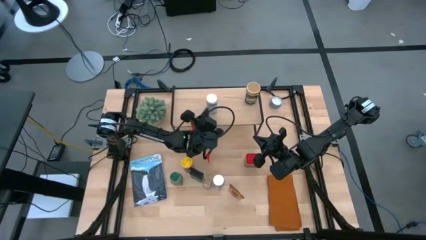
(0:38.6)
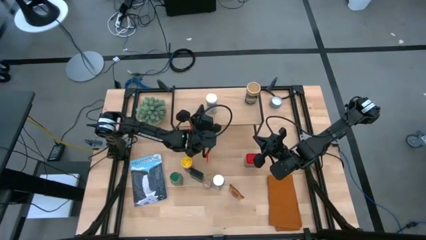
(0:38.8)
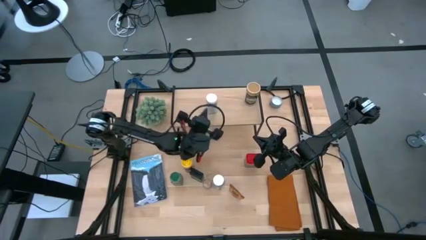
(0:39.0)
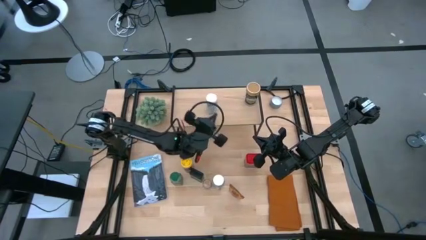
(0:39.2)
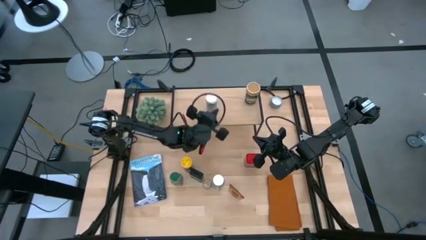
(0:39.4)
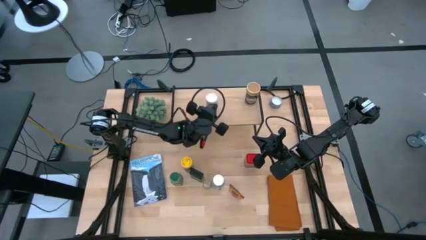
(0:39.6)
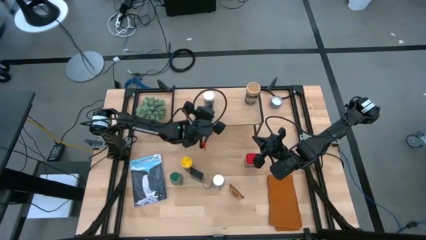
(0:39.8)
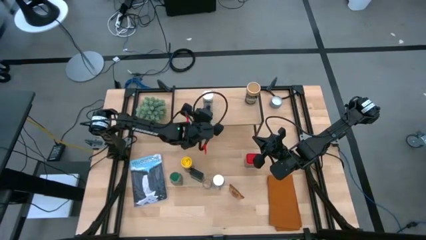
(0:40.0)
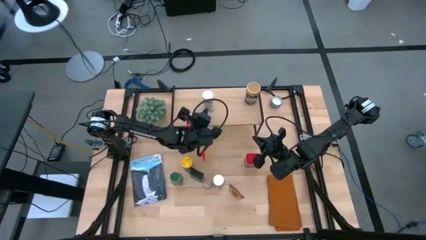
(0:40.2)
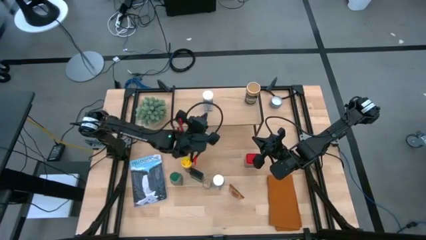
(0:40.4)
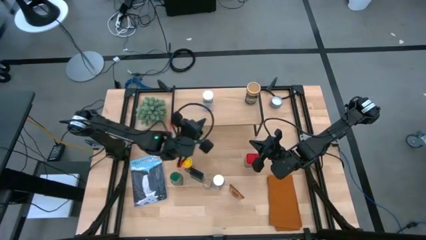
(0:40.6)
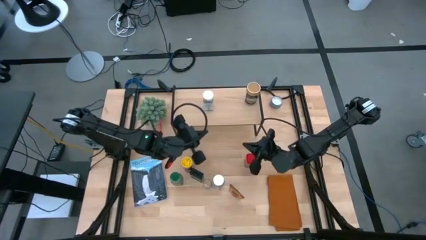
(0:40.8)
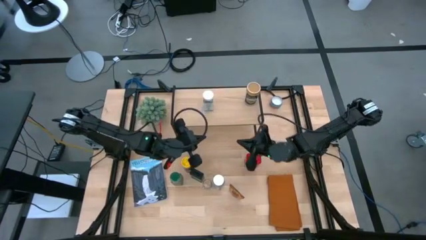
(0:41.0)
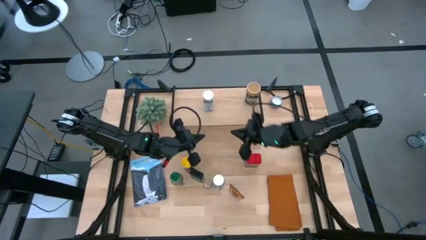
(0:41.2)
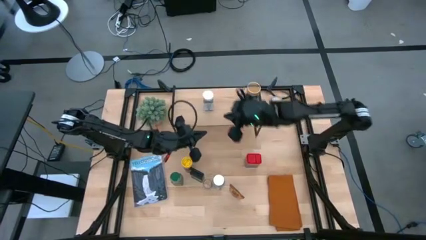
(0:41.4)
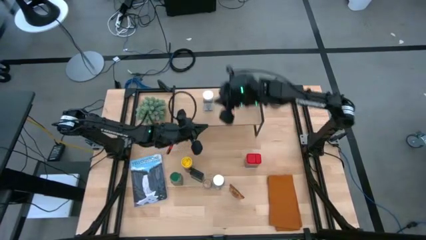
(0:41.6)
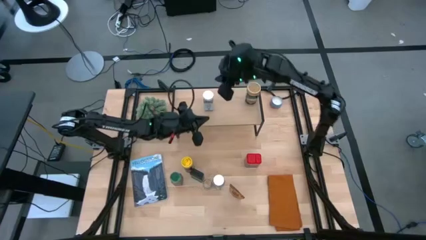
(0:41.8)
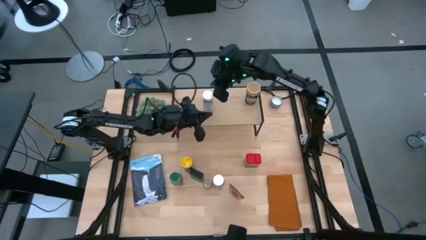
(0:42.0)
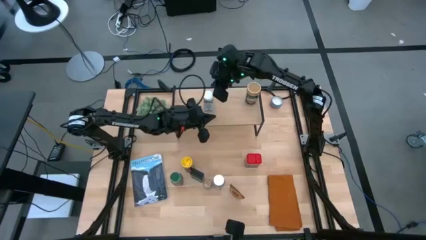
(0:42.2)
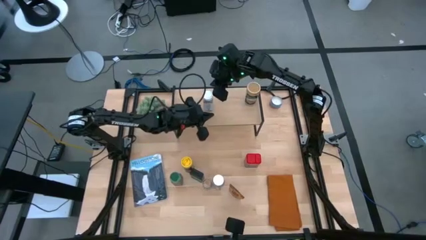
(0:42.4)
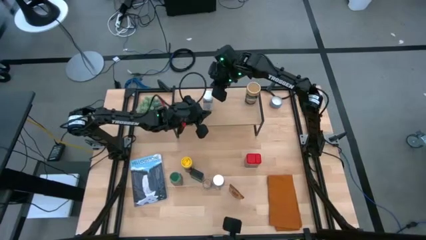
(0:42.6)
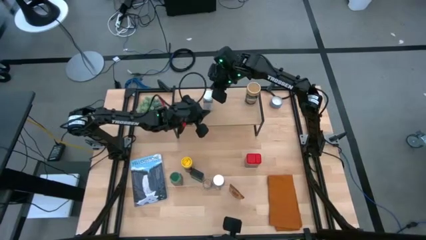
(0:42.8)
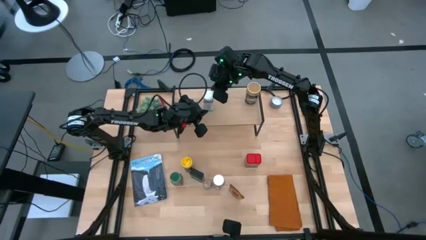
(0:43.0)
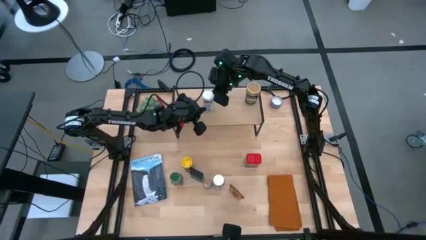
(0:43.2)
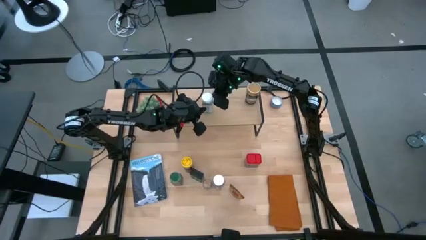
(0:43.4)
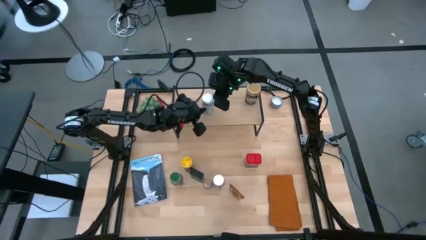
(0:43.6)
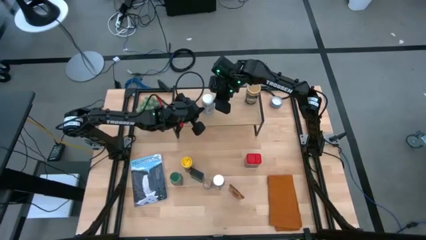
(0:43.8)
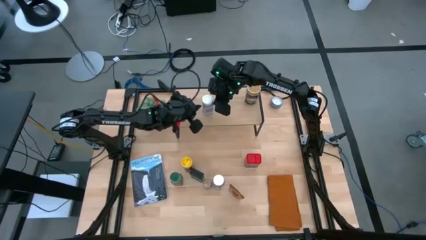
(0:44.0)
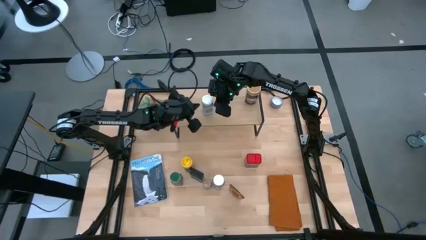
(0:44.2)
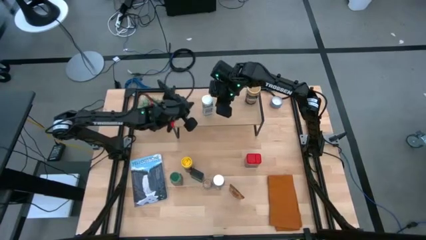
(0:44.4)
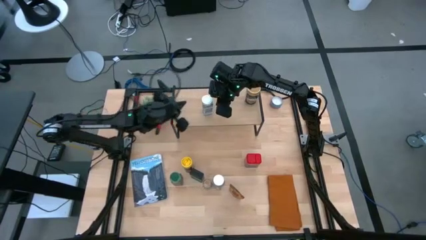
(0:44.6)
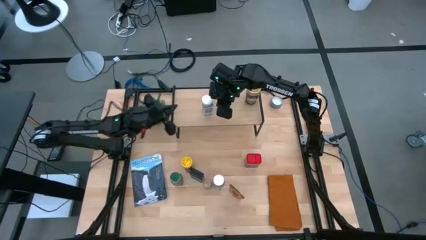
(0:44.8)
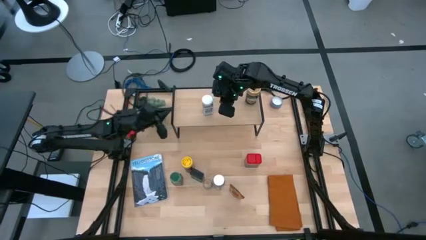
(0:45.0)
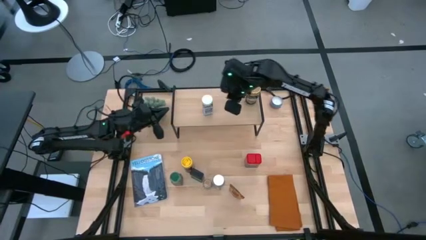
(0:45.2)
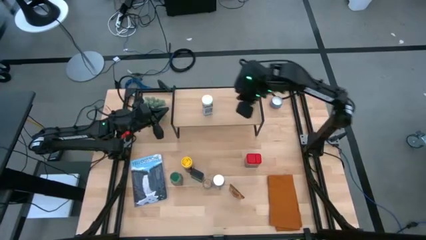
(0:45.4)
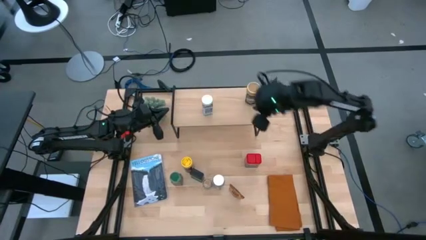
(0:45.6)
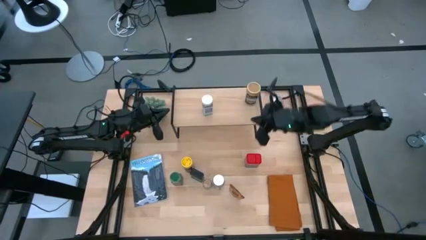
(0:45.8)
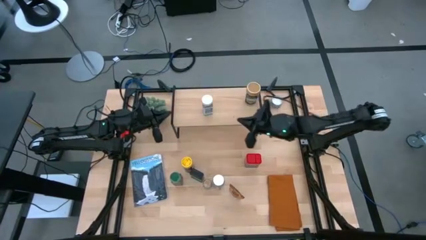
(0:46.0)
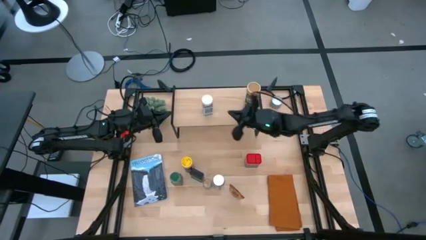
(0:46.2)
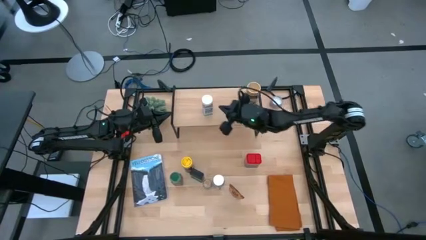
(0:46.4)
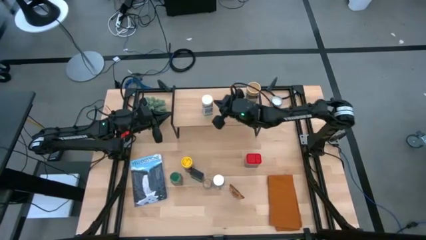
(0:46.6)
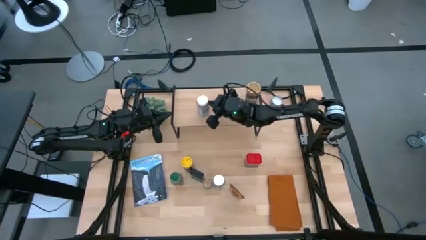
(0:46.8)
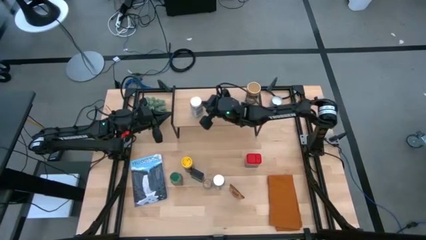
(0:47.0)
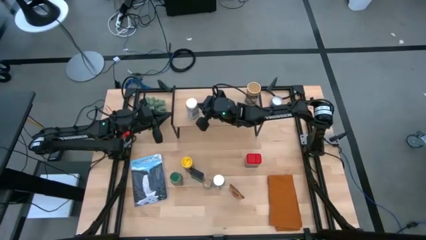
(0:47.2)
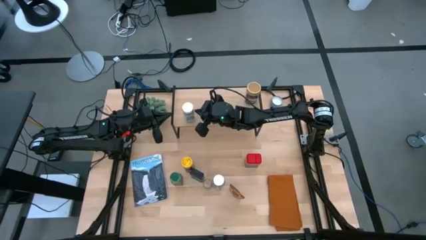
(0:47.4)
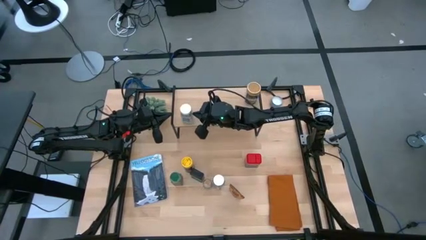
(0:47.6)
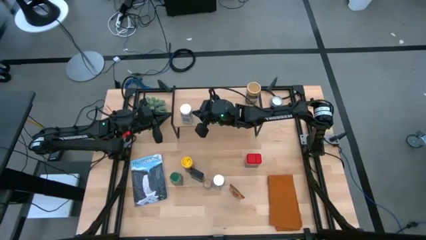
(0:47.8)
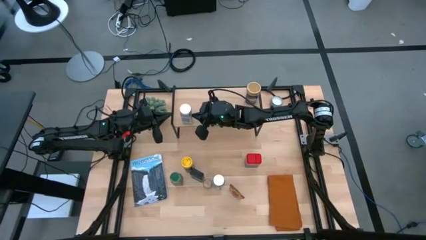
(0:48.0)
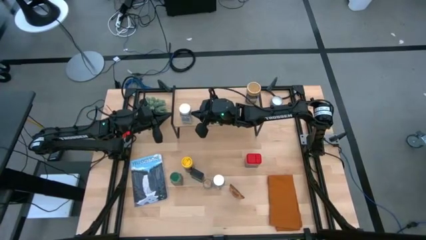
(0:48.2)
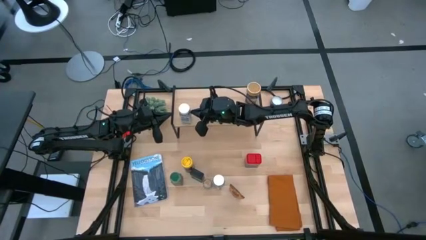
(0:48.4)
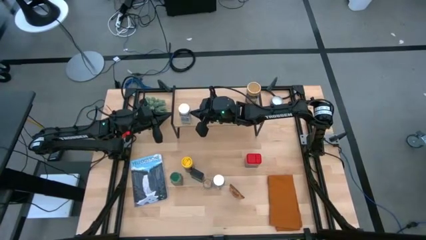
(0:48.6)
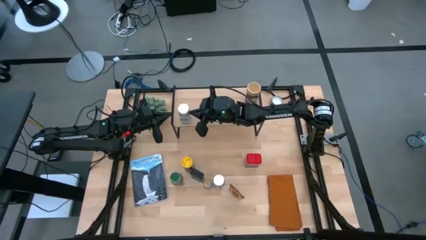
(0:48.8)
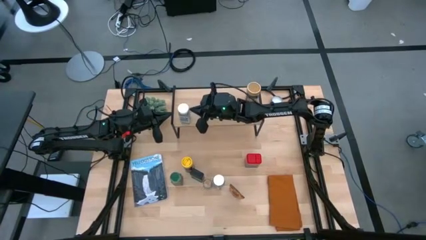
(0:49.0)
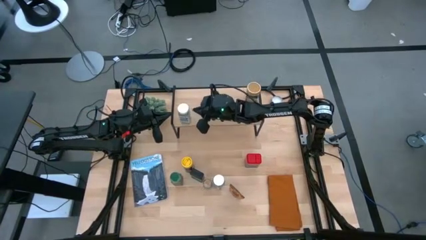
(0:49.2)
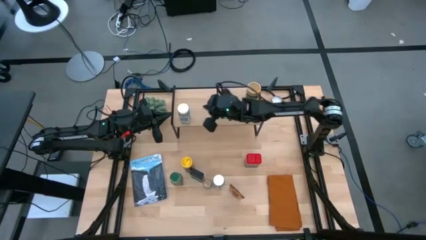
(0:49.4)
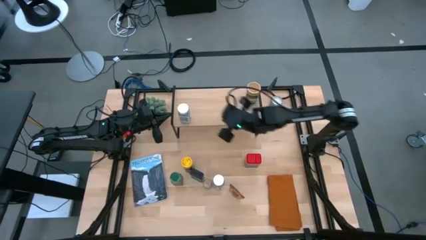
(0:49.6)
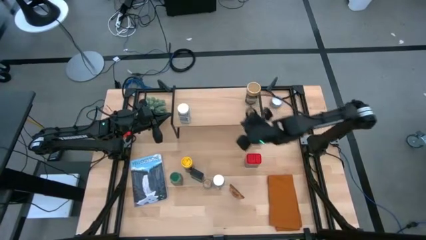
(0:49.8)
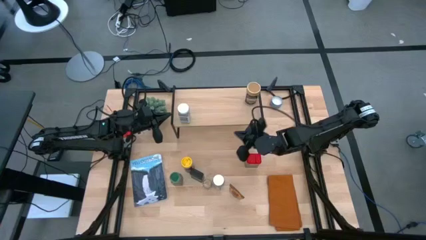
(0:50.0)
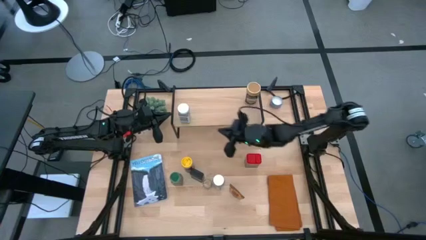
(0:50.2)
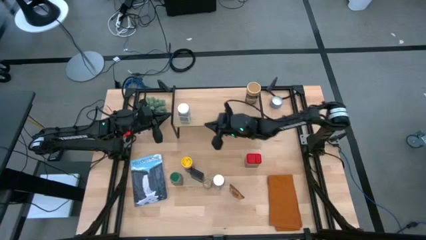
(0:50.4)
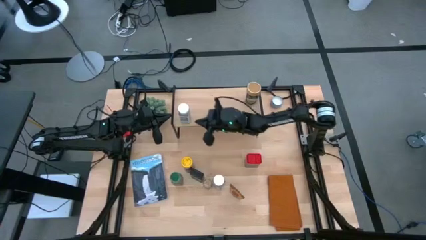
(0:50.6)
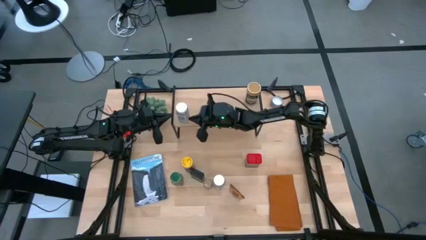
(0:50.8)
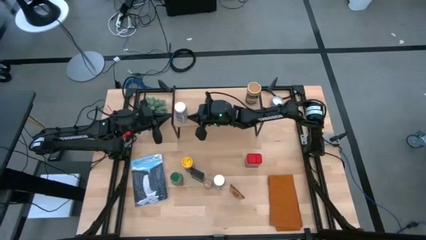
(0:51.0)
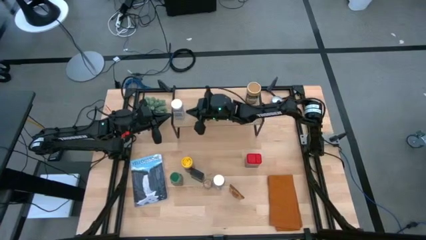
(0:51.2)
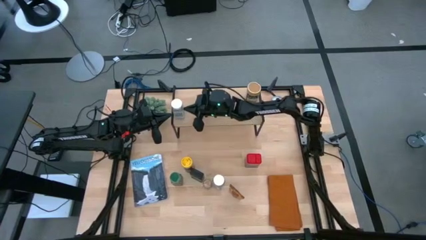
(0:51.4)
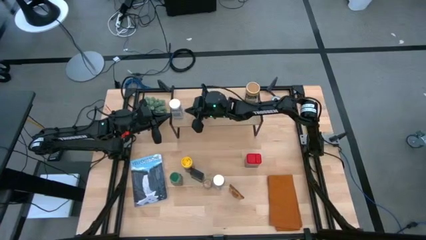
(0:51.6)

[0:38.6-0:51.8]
Task: Shelf spices
Put the right white seasoning bottle on the shelf

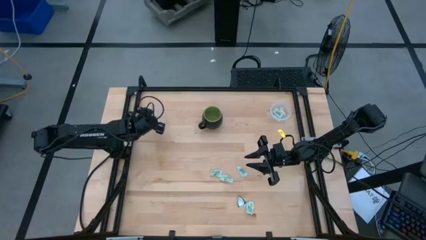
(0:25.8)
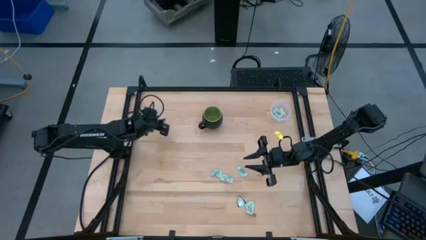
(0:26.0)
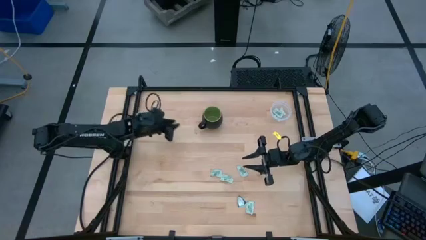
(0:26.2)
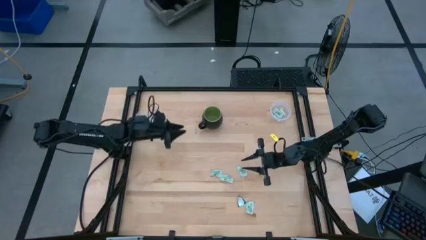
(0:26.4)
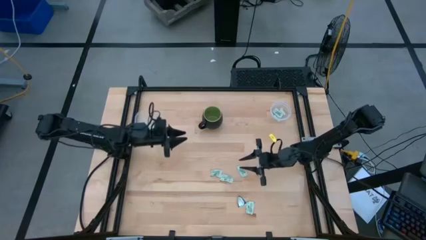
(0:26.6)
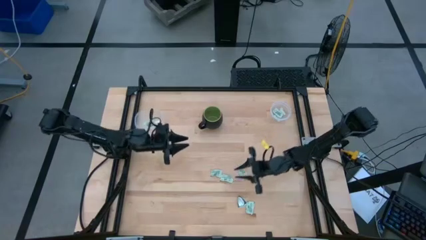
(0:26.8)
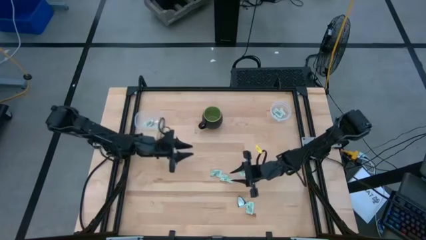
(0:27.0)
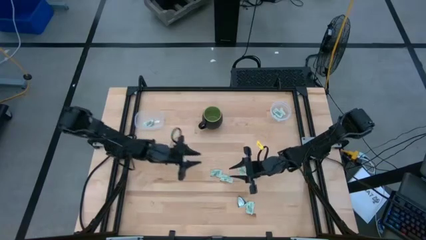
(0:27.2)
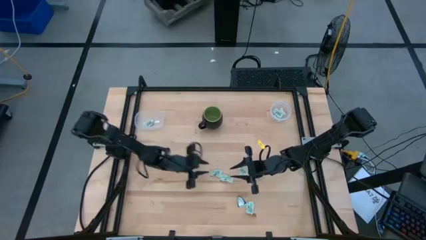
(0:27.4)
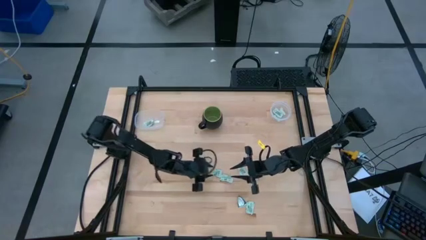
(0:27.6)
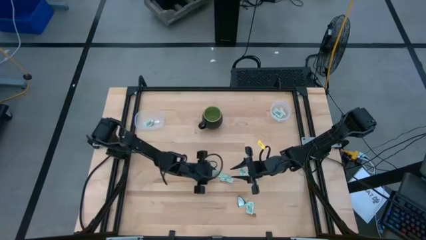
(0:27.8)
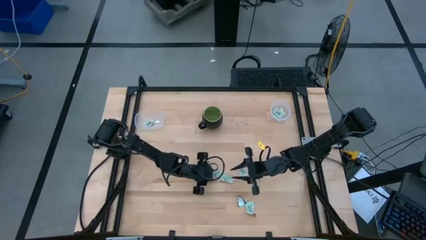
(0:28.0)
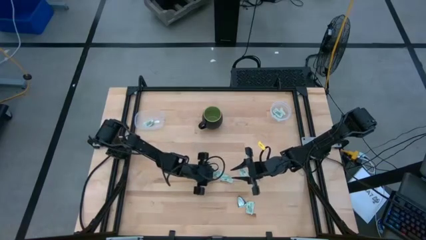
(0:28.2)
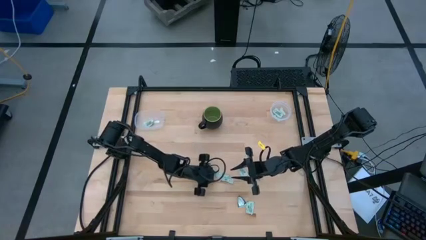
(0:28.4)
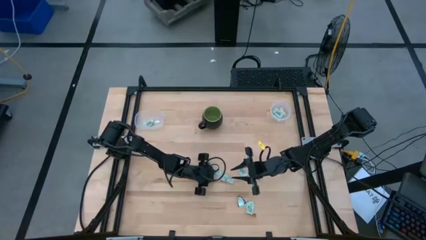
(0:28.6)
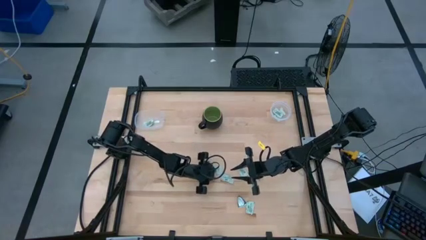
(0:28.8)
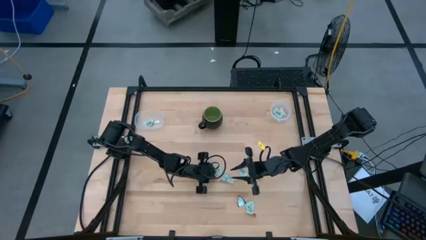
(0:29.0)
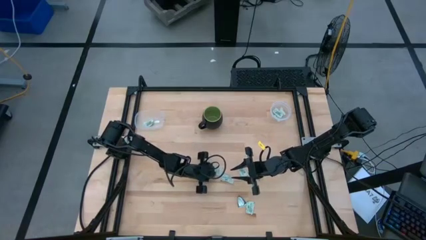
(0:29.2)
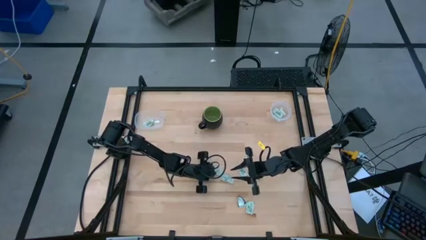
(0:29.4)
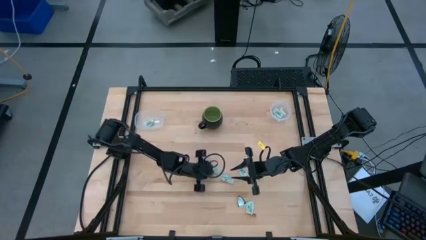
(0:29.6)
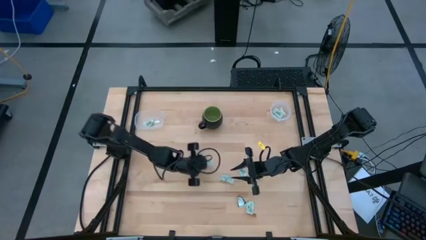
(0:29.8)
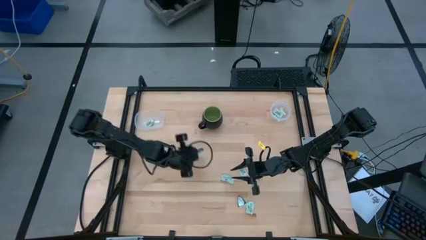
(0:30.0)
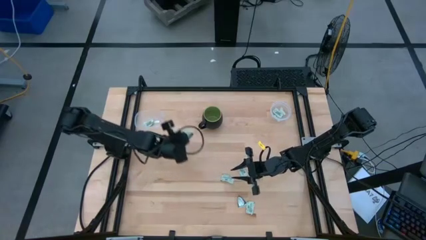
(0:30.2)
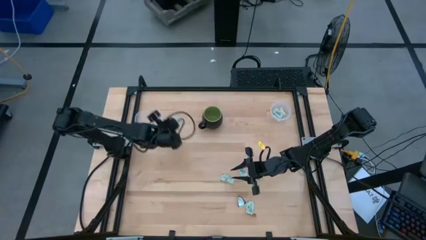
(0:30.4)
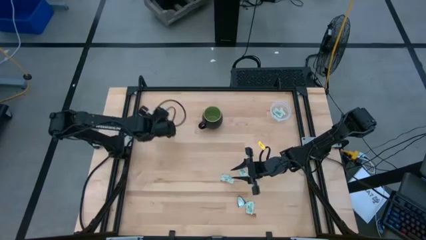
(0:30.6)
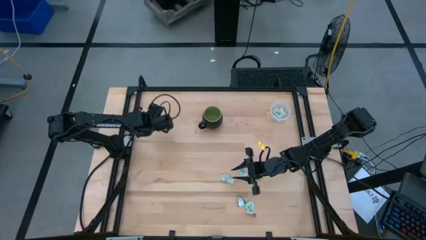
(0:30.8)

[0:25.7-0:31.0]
Task: Pick and place items into bin
Put the white stevia packet into the left transparent bin
